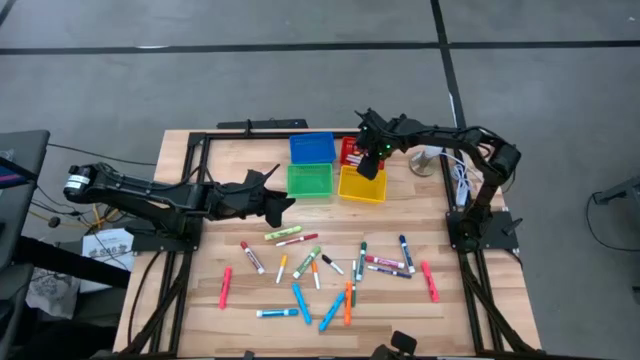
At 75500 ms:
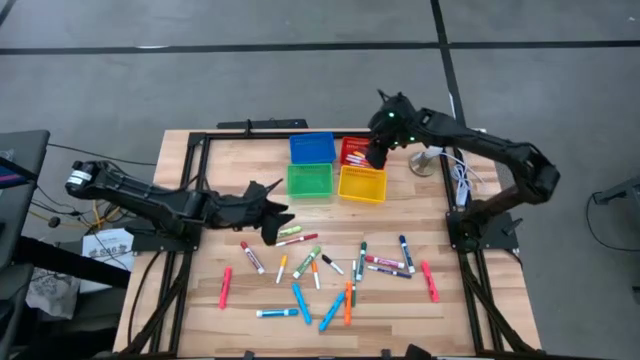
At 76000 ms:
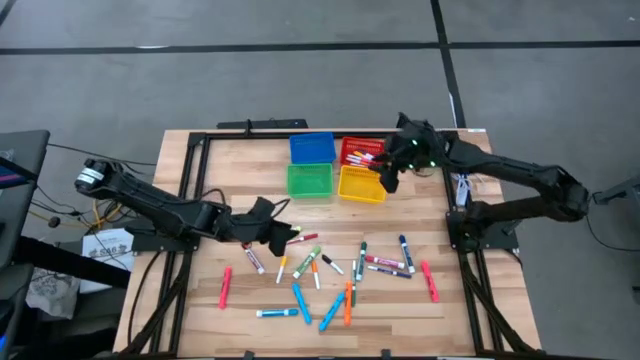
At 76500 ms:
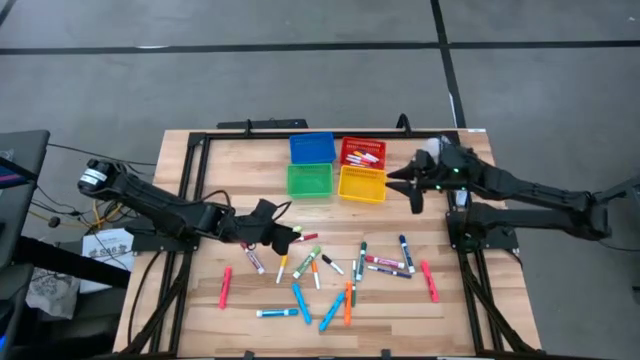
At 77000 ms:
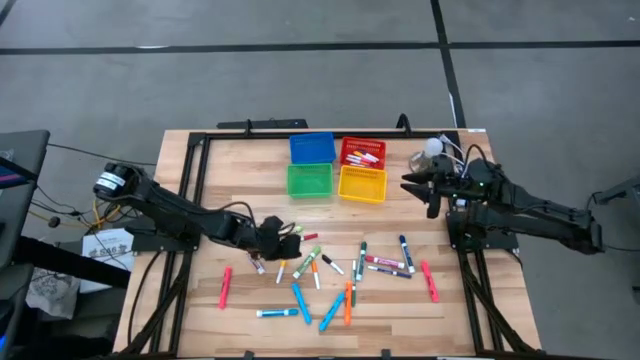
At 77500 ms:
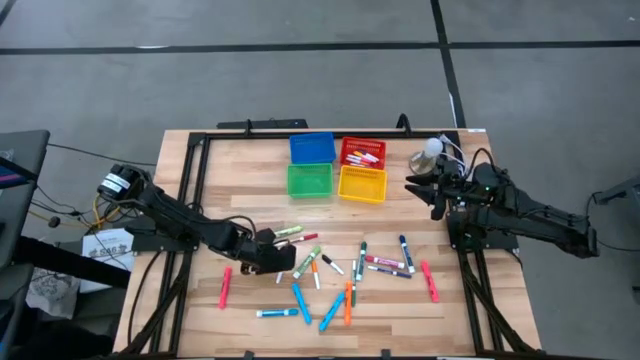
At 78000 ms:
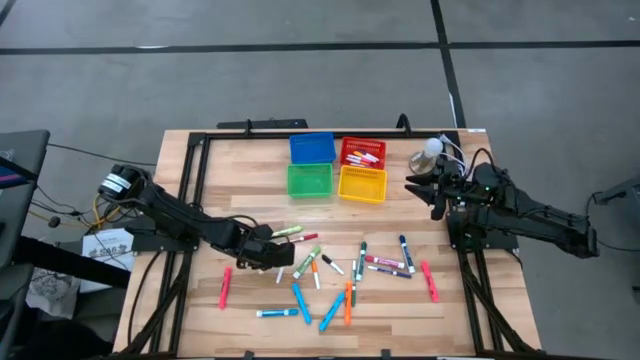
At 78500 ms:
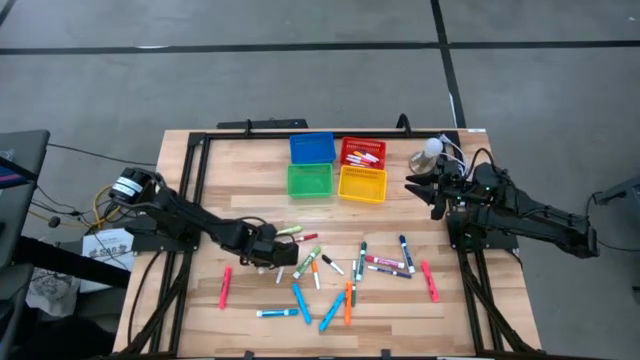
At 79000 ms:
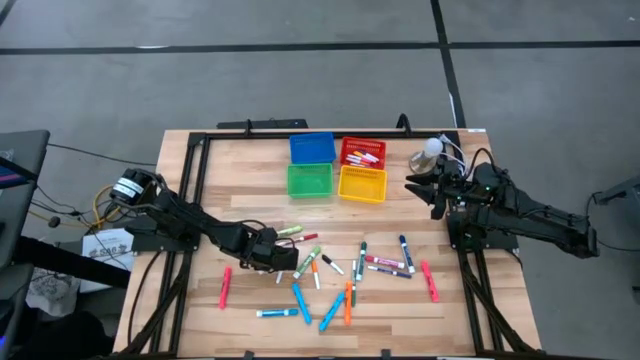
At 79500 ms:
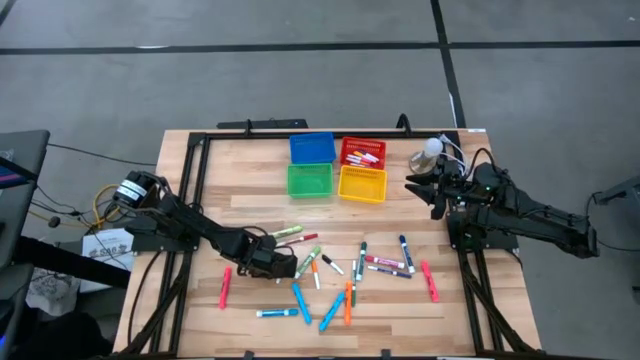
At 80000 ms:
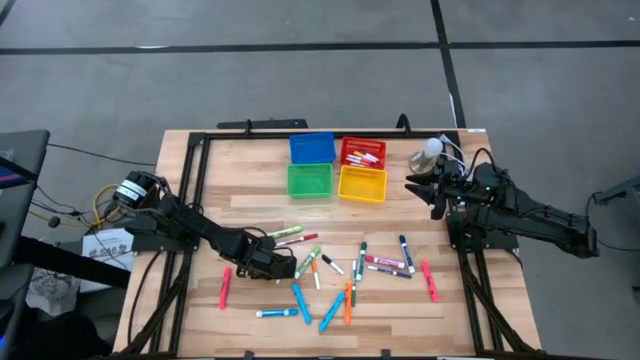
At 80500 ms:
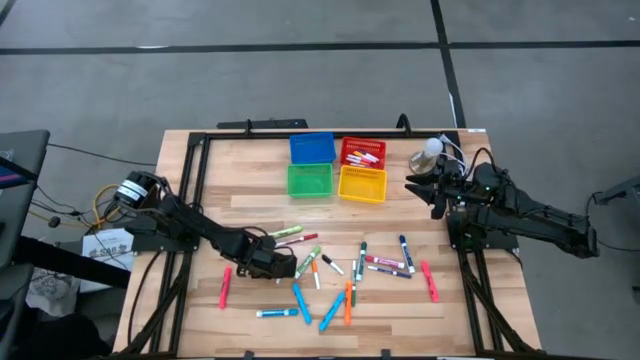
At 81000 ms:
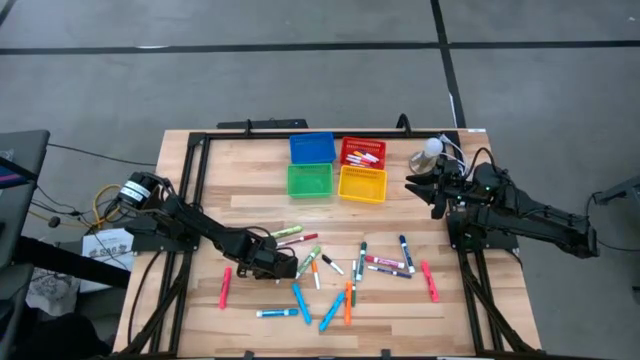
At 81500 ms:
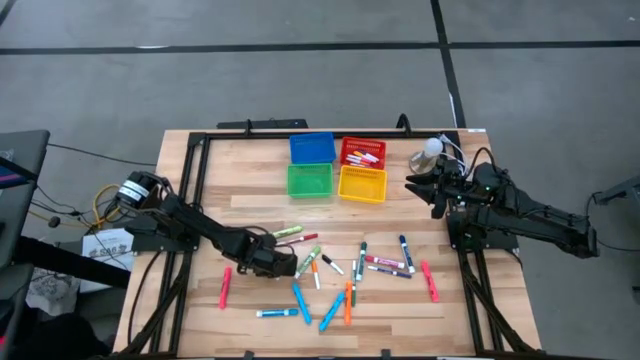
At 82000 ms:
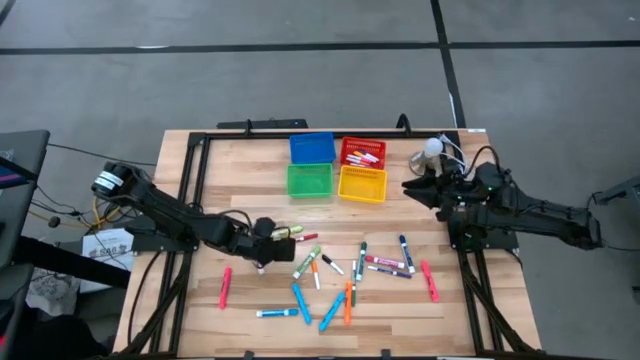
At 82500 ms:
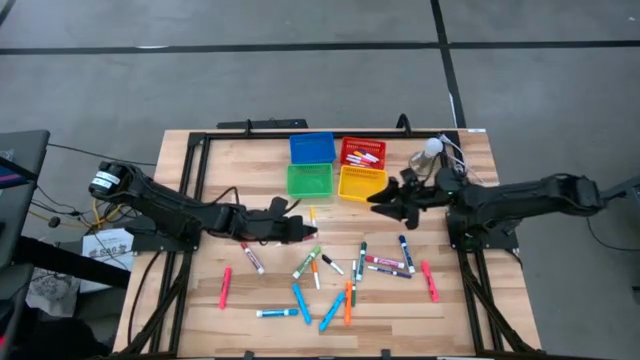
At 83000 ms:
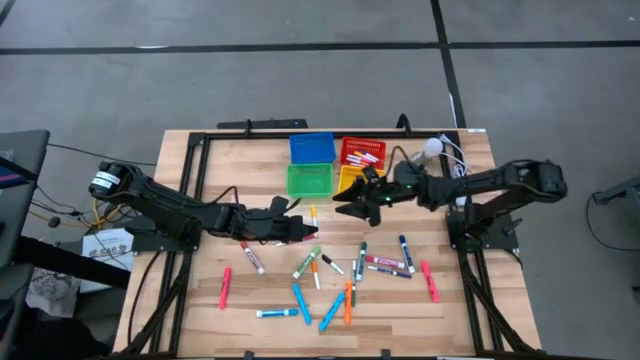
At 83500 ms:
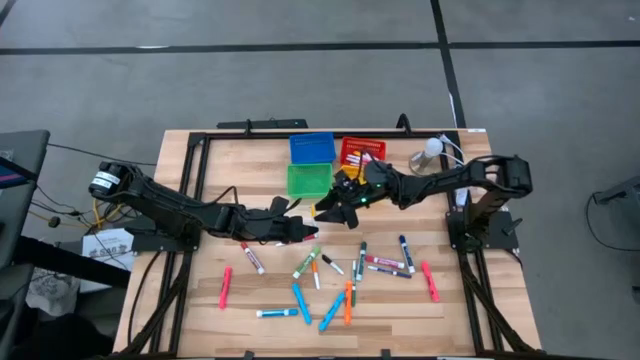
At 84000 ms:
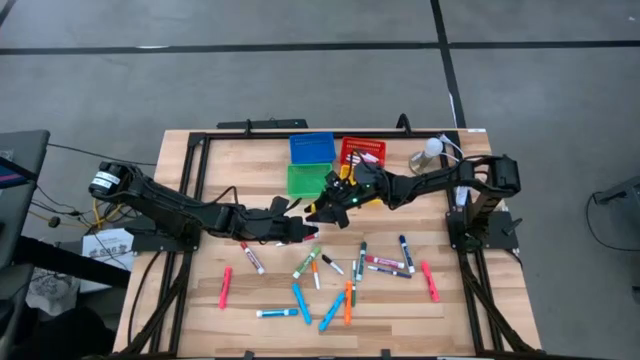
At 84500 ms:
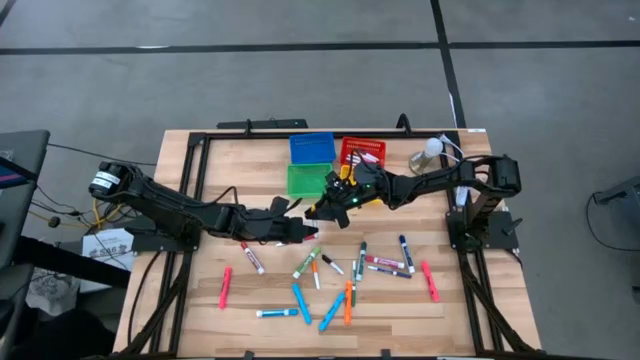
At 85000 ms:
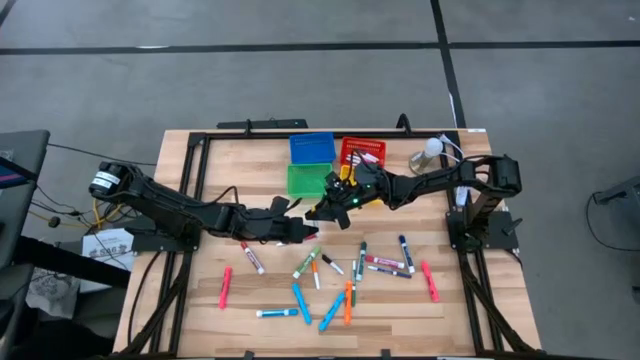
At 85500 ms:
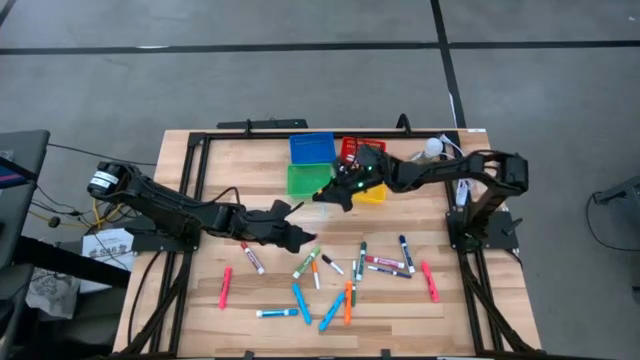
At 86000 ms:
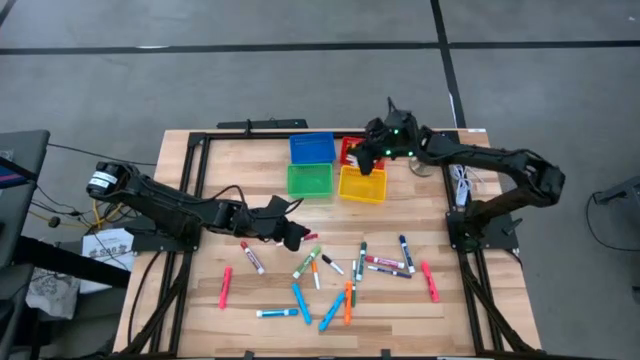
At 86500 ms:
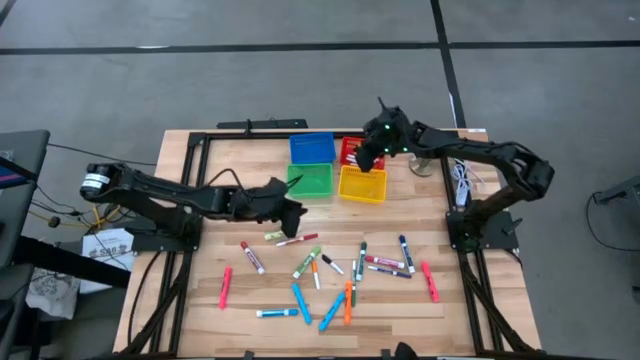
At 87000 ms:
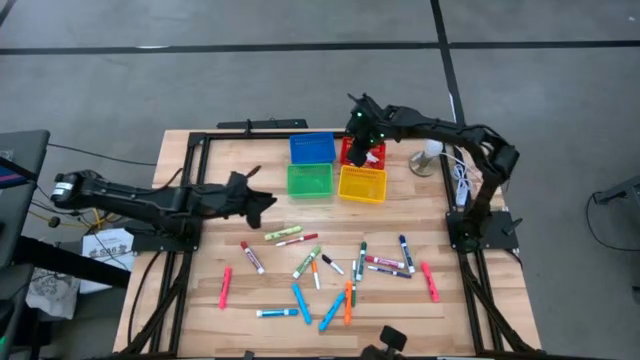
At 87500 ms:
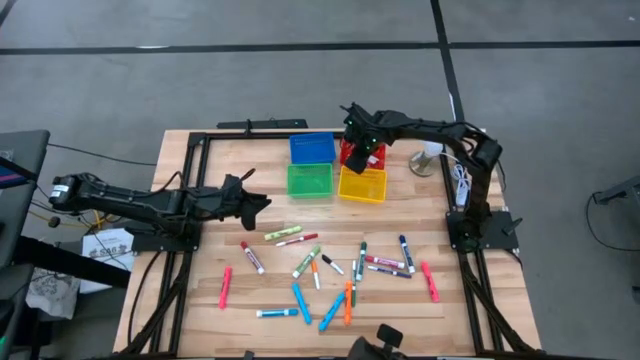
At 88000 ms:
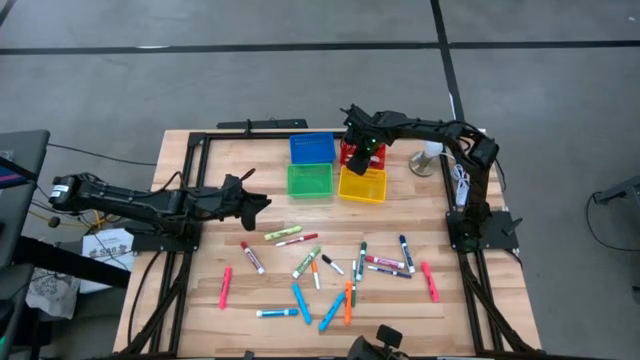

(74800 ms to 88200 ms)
Task: Pick & Place Markers
Put the yellow highlighter into the red bin

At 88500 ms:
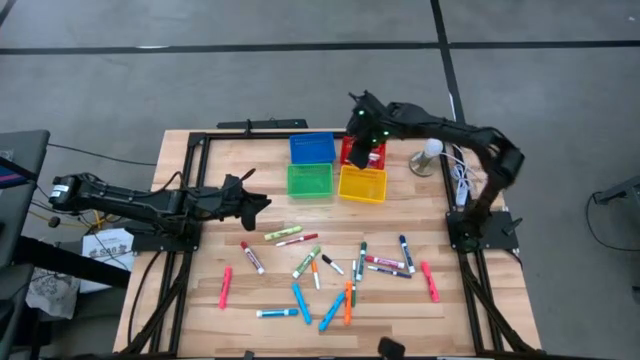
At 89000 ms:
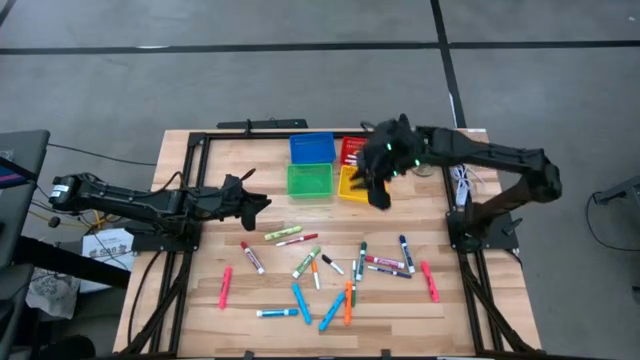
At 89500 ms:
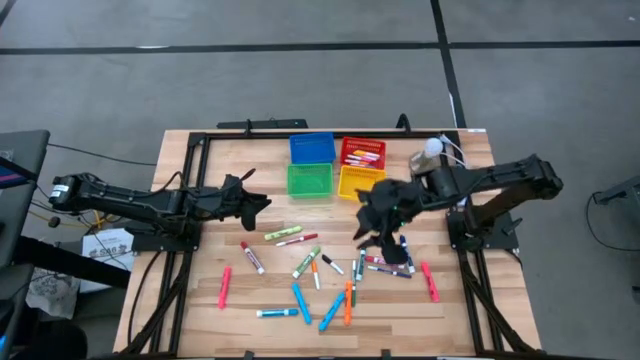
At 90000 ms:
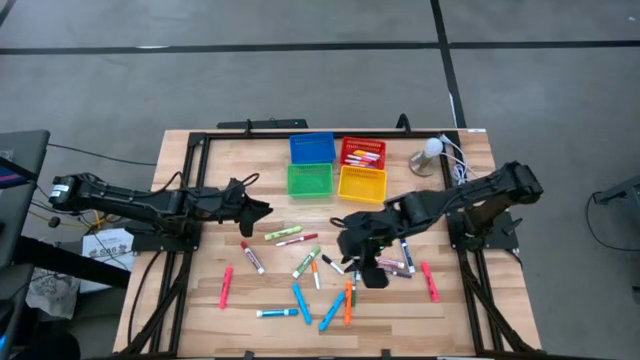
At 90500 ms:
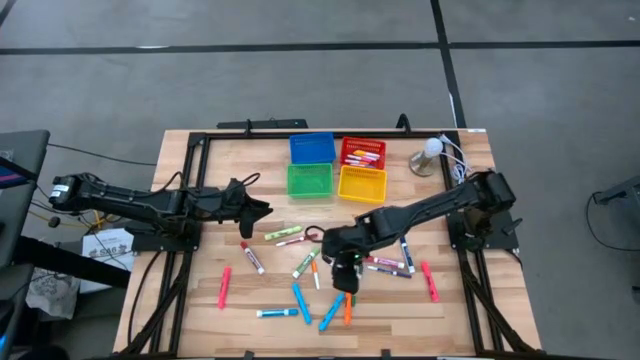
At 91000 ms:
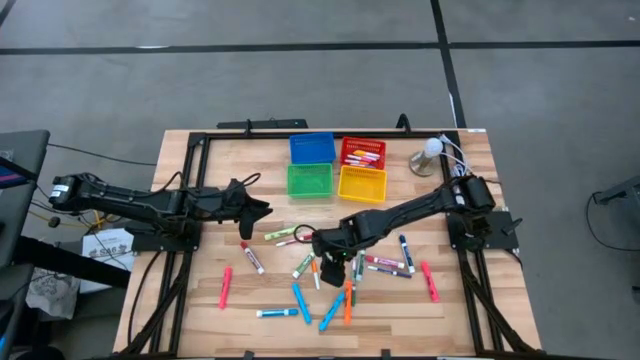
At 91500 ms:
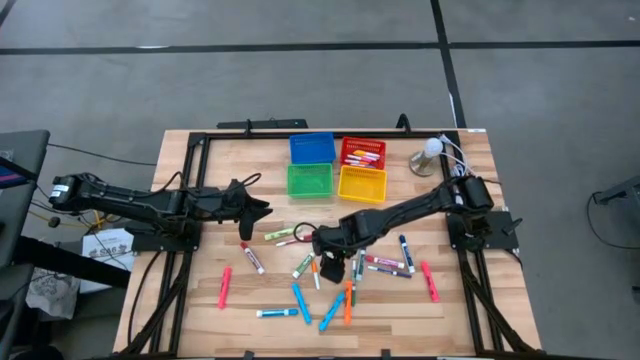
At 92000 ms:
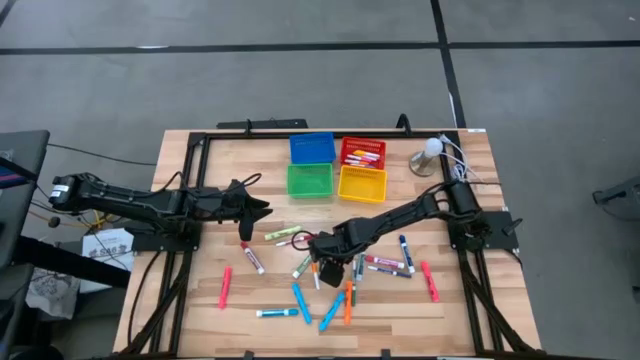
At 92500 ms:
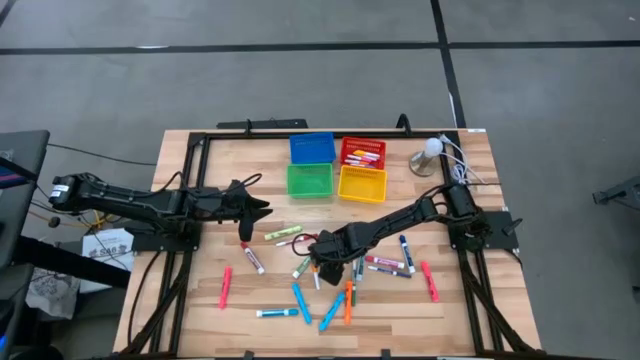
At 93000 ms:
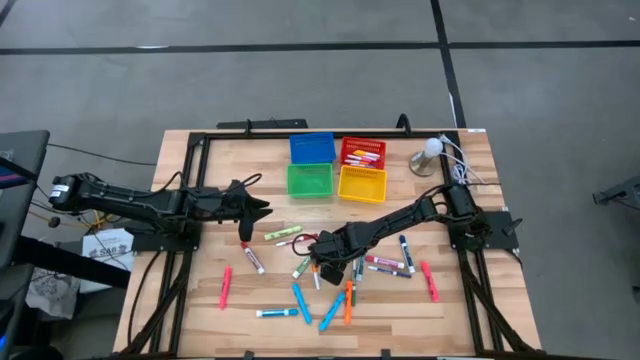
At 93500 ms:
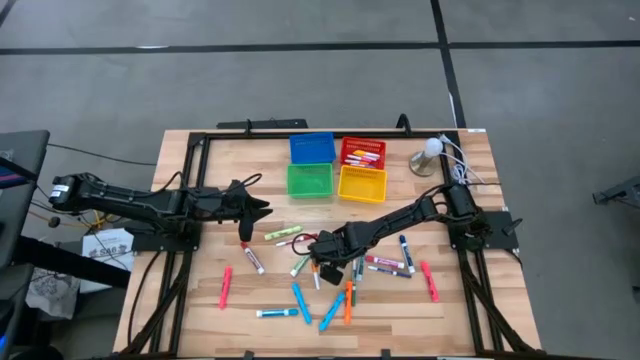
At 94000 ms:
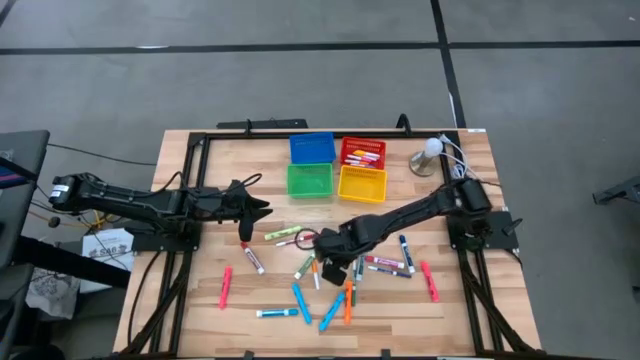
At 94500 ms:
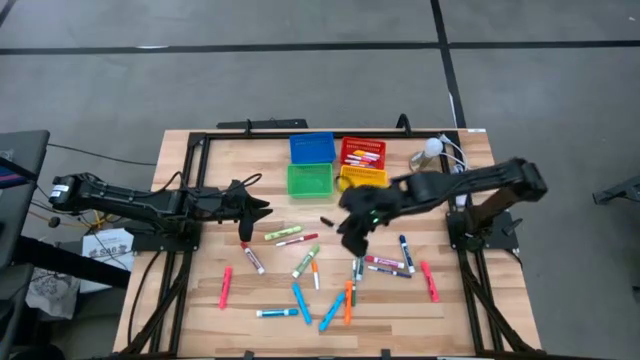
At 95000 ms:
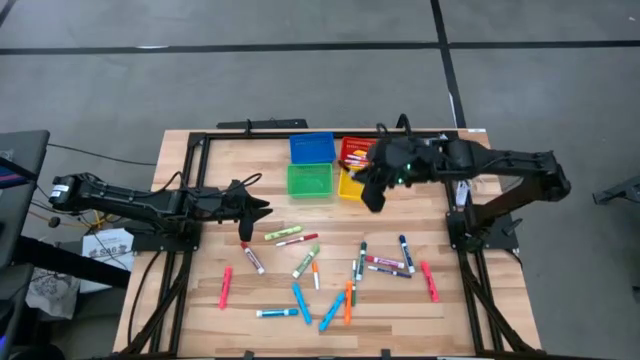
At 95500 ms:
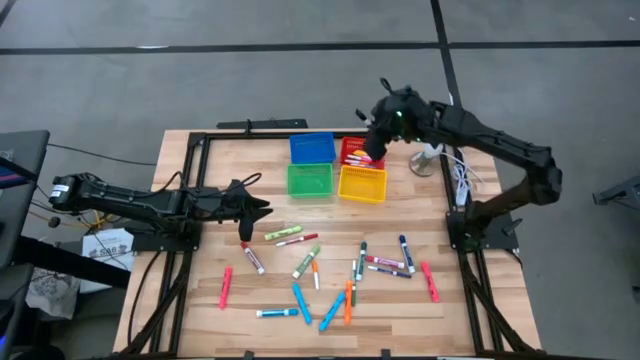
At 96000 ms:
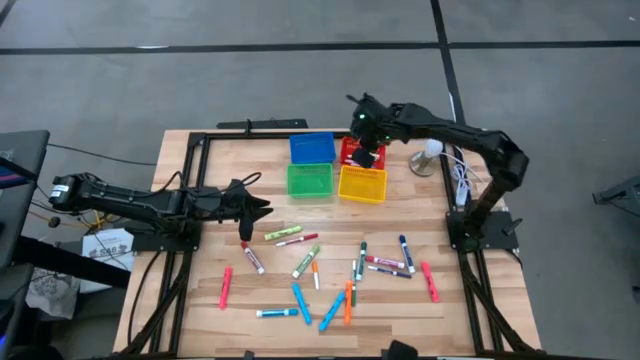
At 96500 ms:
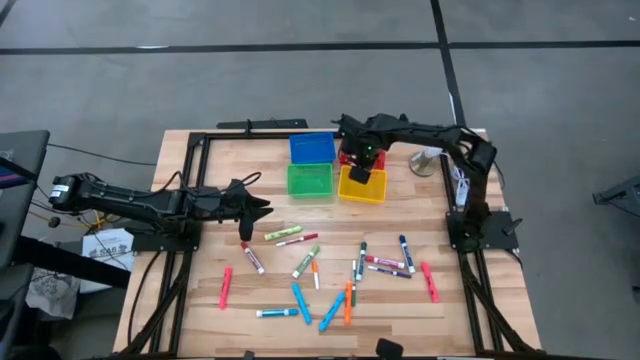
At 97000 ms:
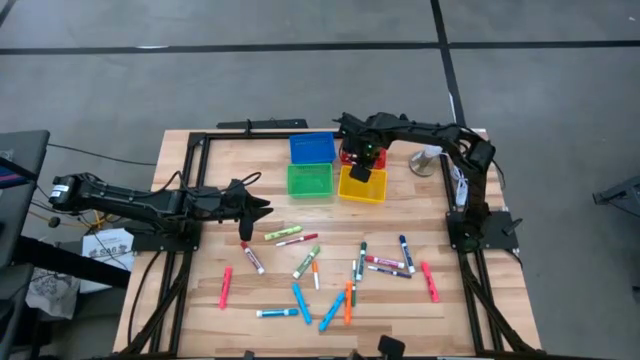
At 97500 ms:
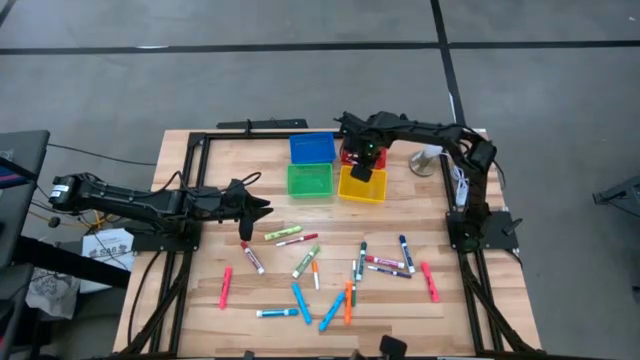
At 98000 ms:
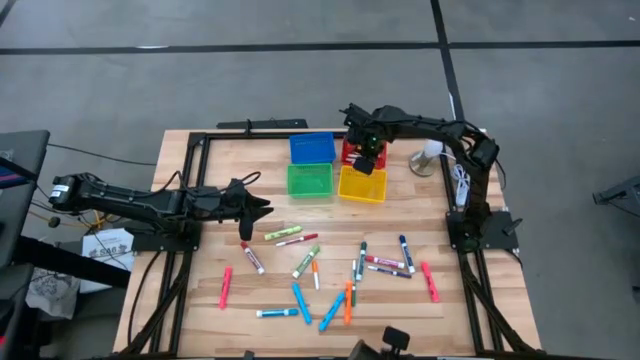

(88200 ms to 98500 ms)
Put the black highlighter into the red bin
